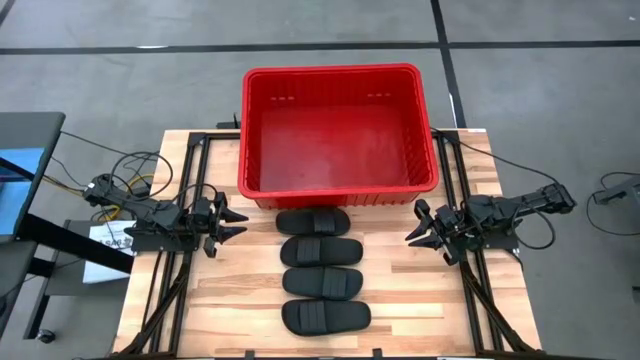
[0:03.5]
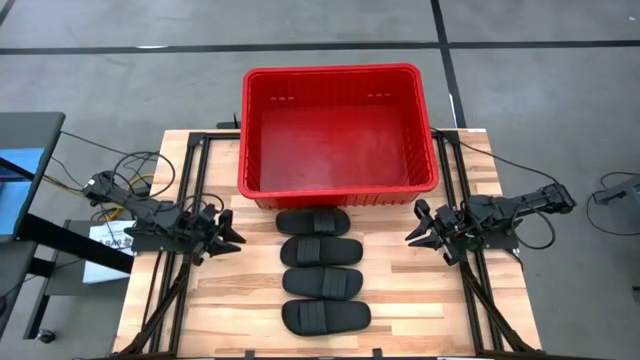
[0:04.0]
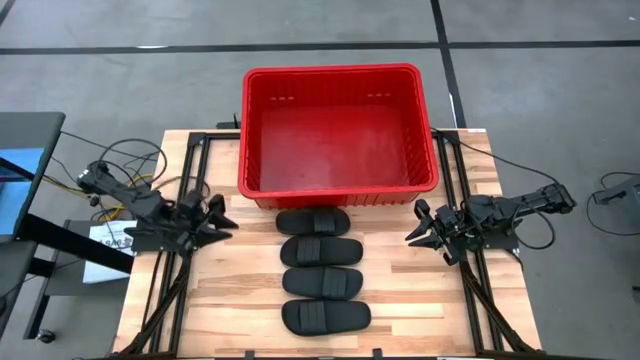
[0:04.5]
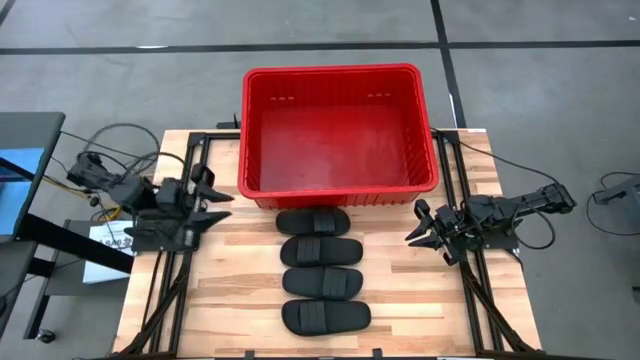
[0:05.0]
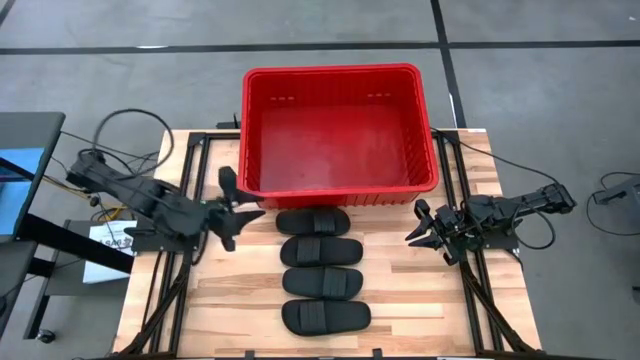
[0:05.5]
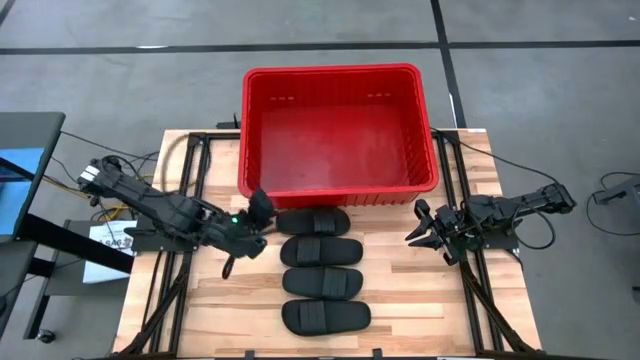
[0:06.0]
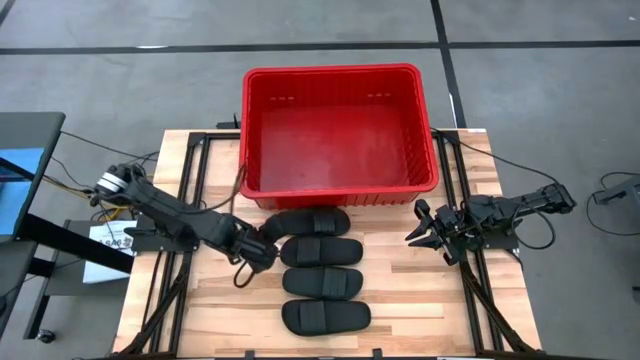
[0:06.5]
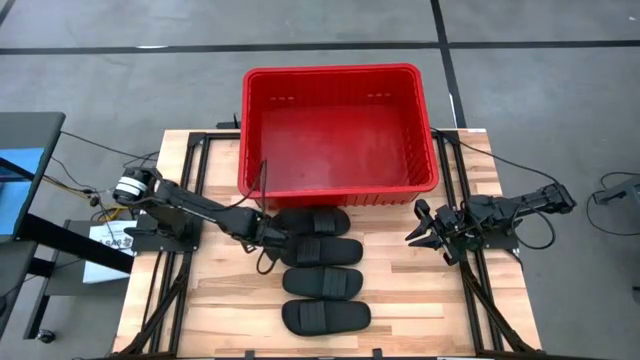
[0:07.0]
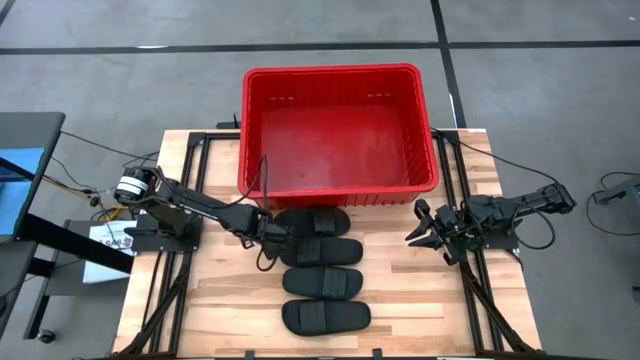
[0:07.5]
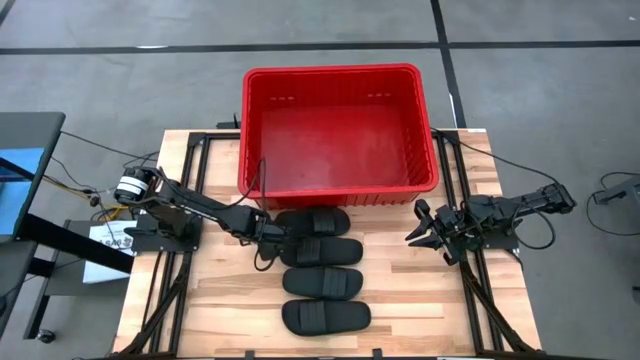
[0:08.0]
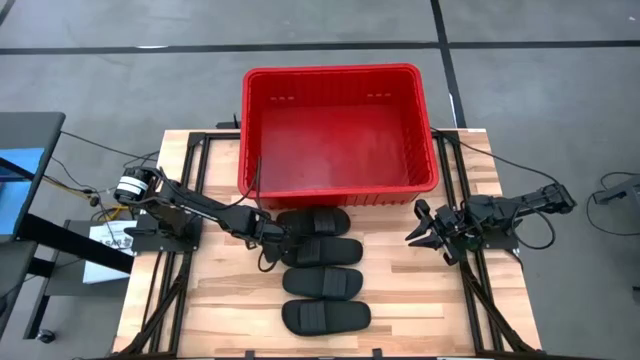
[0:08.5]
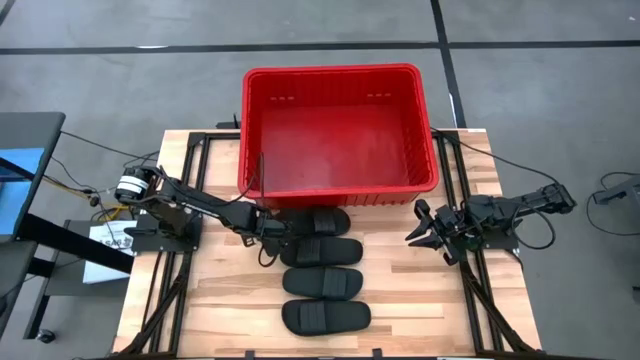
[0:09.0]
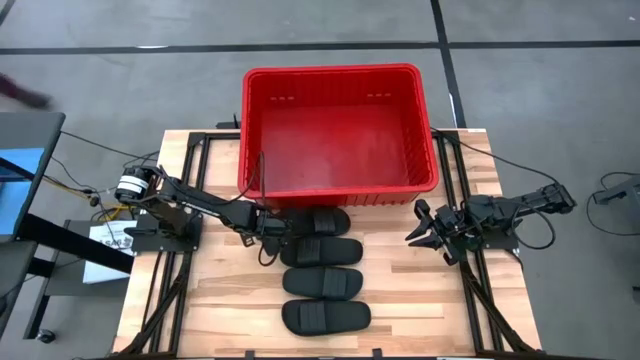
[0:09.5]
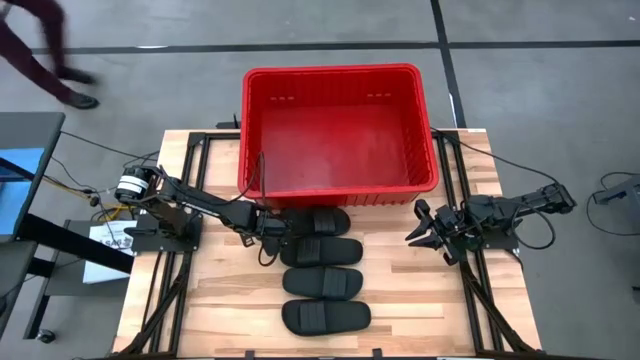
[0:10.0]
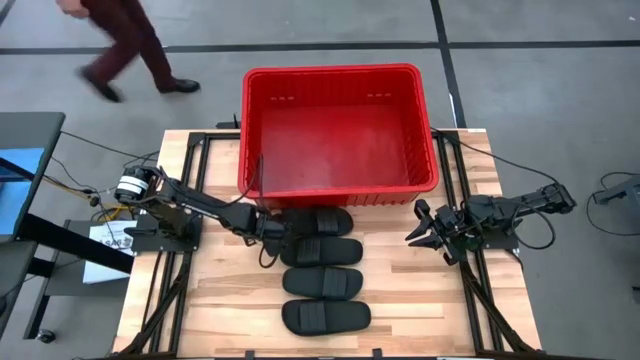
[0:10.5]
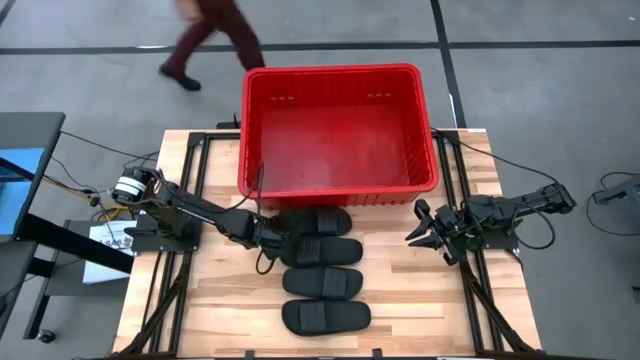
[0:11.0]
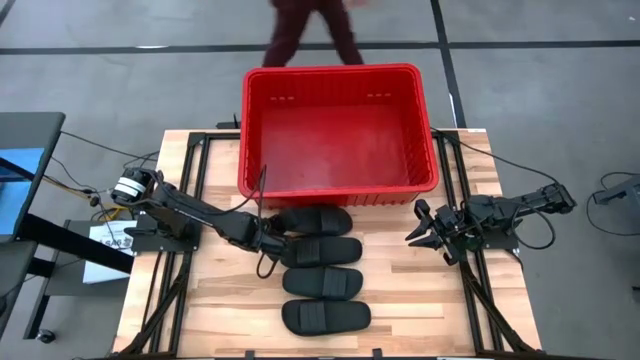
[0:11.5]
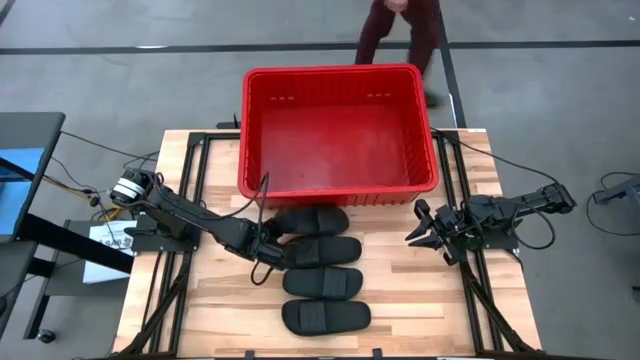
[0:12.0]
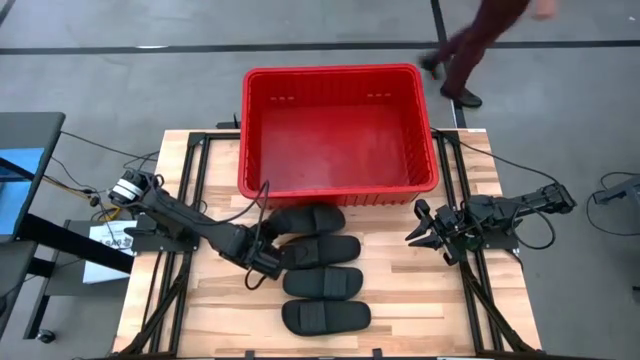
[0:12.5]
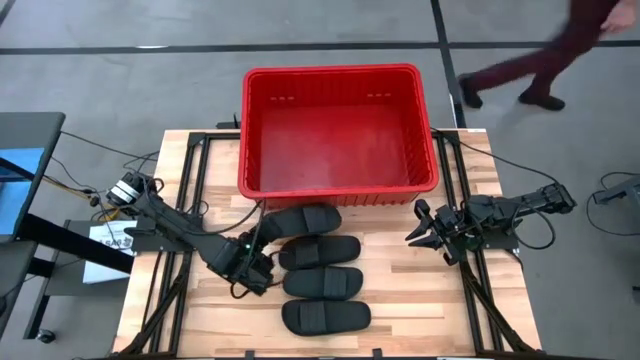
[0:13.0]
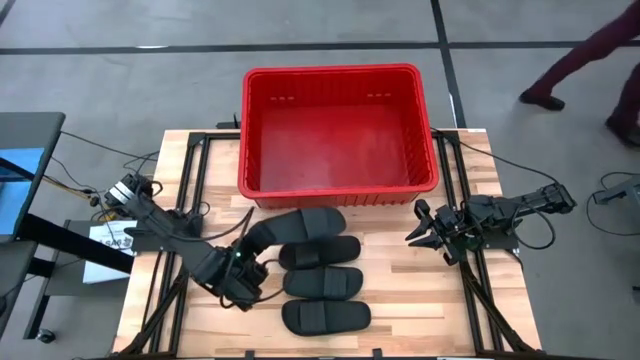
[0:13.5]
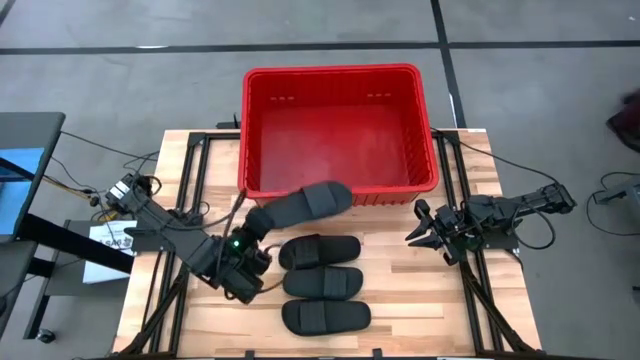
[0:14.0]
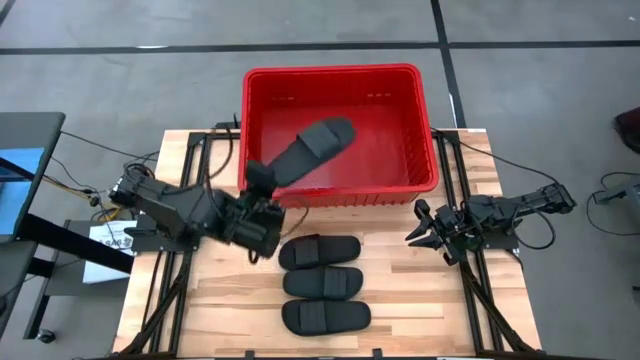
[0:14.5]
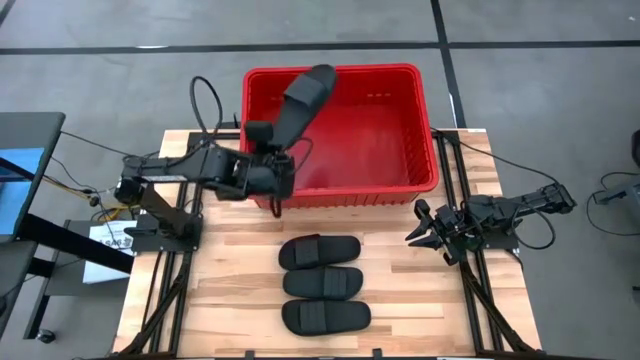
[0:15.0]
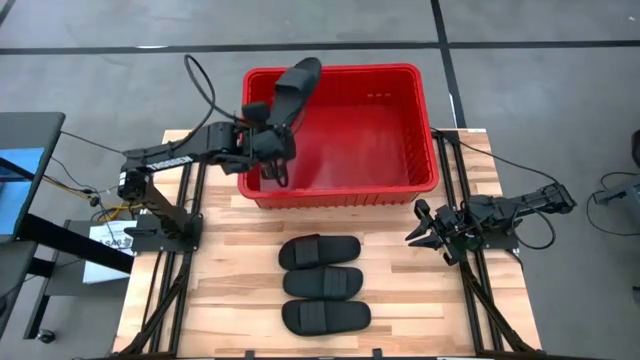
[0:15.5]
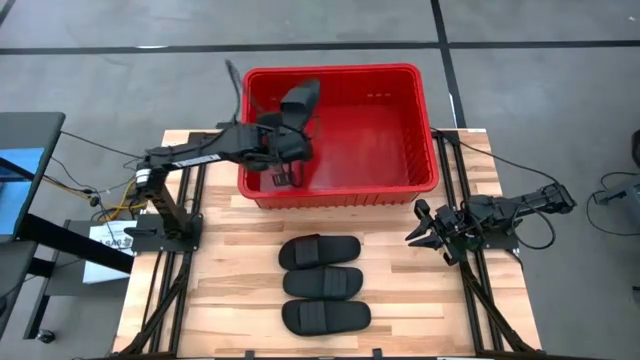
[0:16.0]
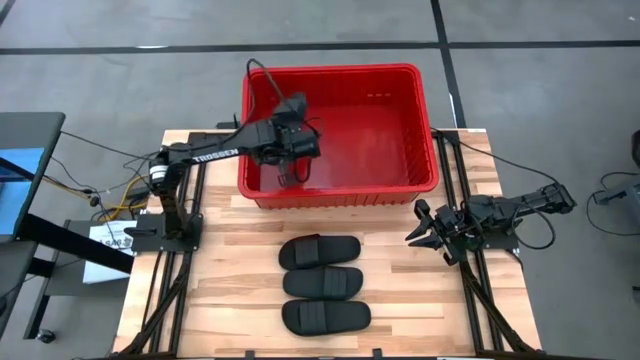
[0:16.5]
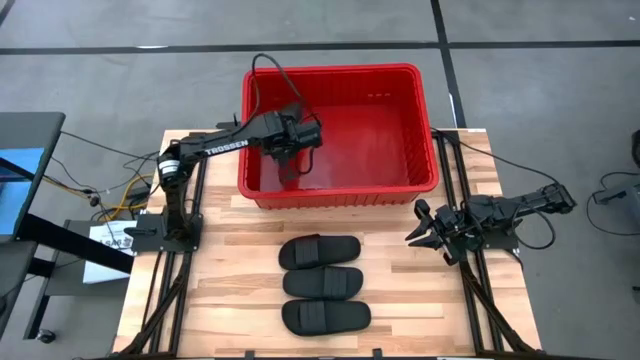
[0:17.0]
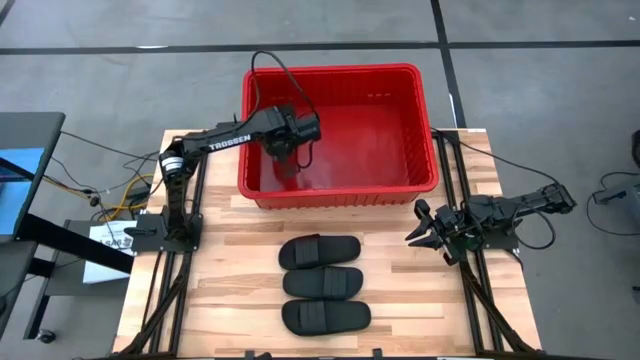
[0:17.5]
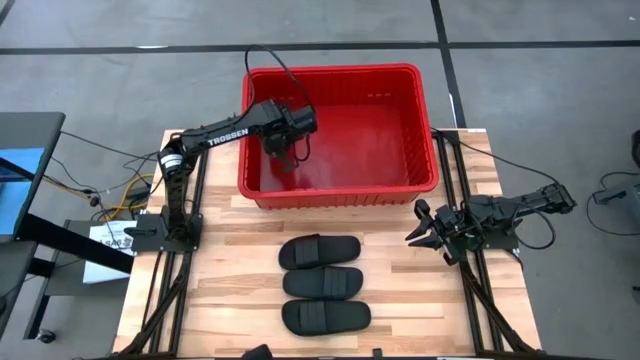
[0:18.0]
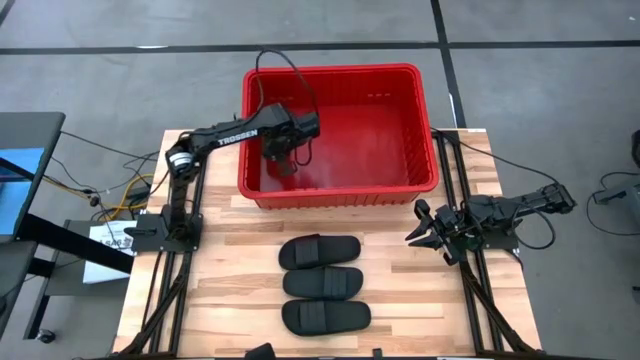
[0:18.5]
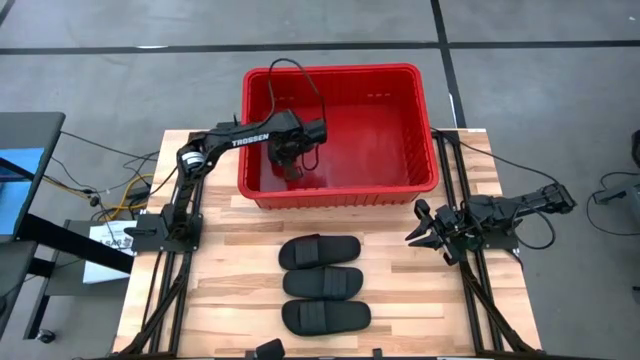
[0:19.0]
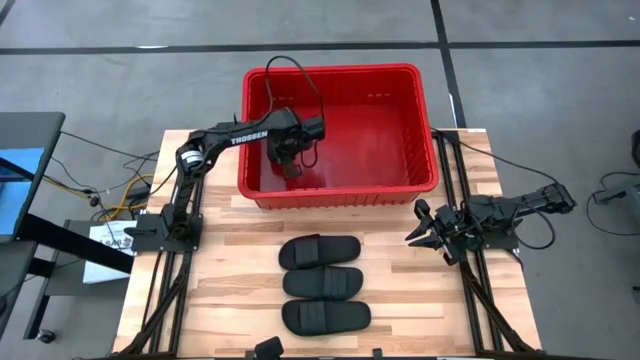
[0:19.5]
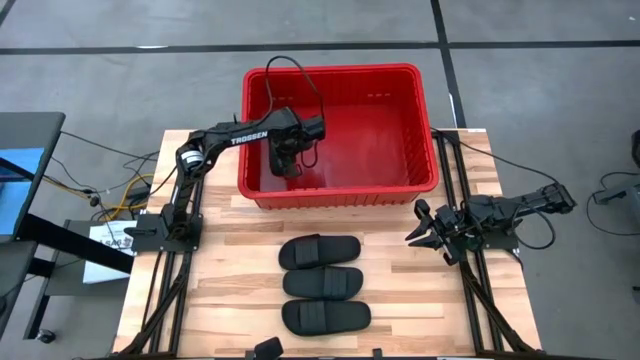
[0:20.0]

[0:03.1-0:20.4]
Task: Pick and place slides into bin
Put the black slipper into the red bin

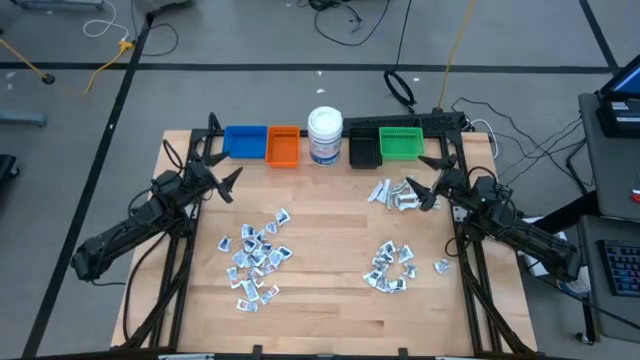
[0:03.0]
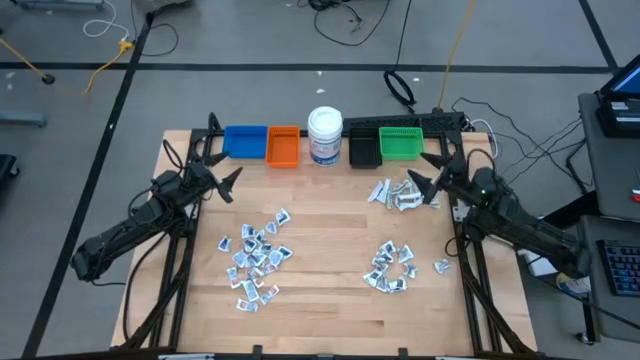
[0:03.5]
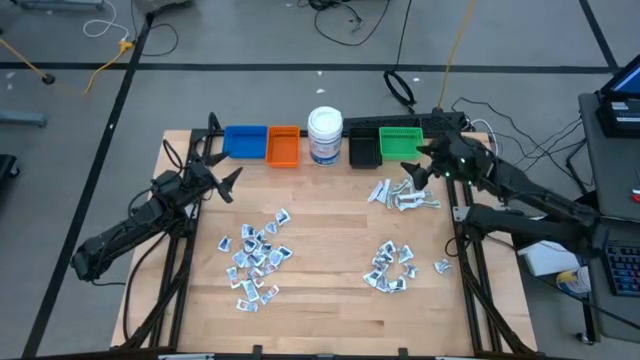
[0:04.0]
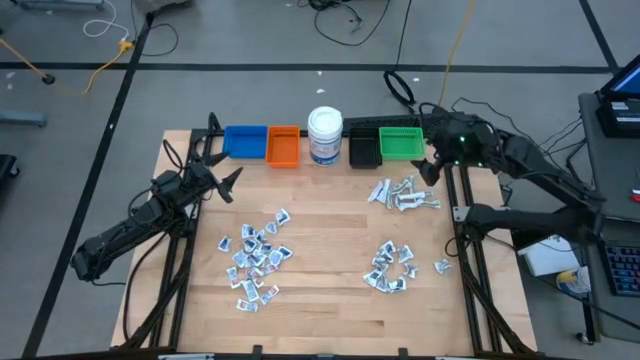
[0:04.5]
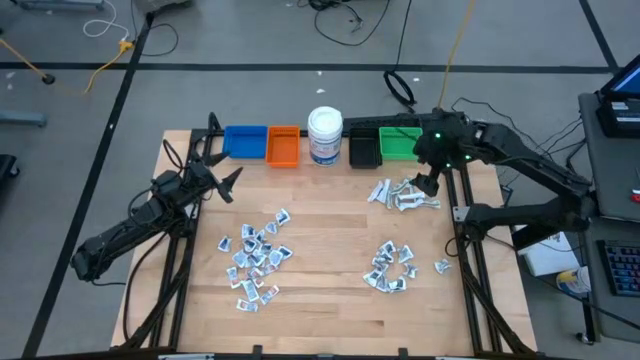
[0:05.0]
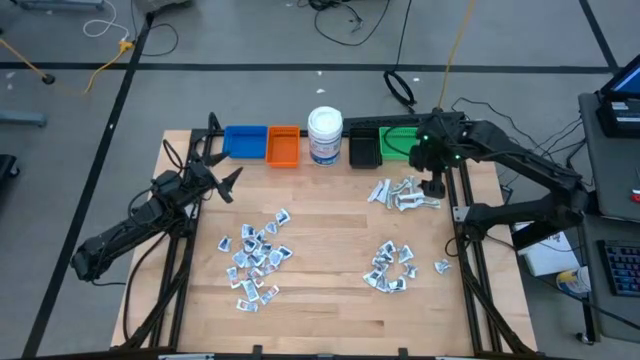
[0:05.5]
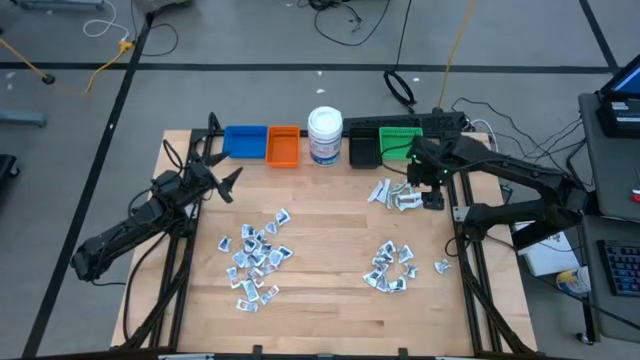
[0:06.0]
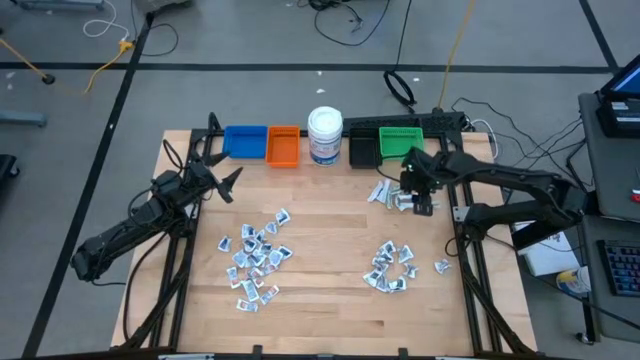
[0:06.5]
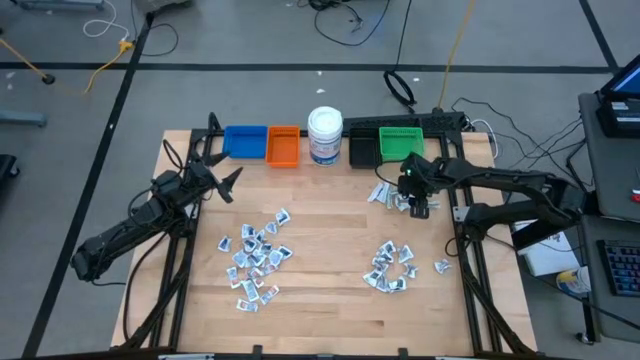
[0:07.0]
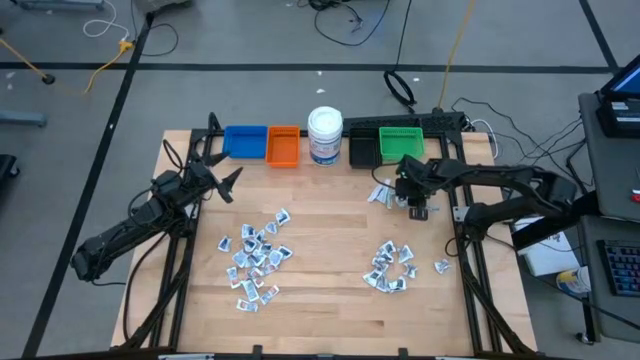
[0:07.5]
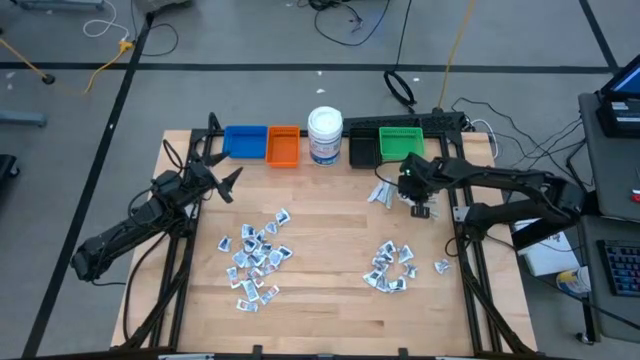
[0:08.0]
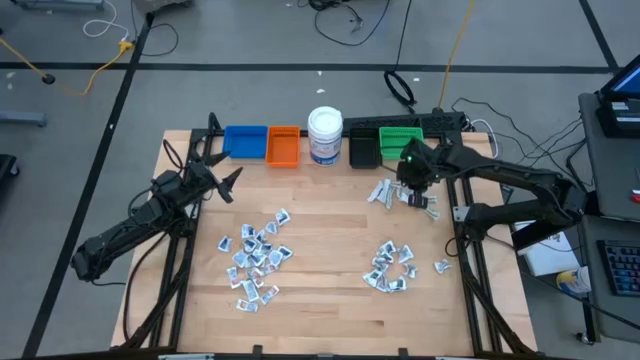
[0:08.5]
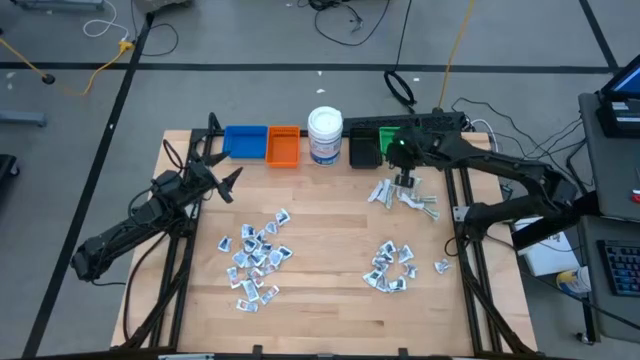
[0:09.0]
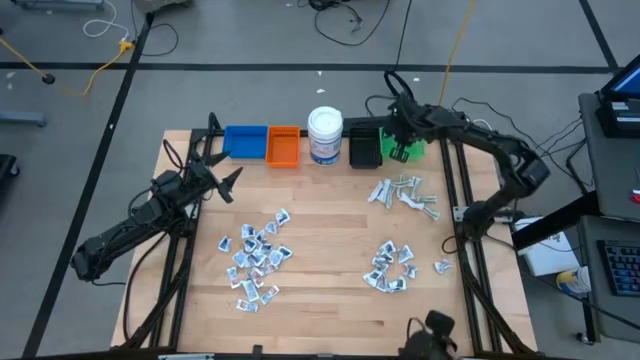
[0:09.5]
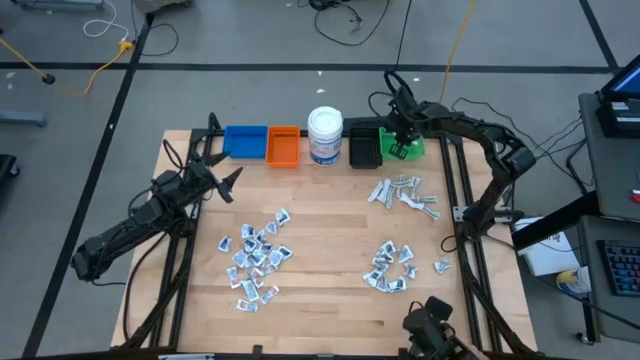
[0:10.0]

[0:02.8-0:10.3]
Task: Pick & Place First Aid Supplies
Put the bandage into the green bin
